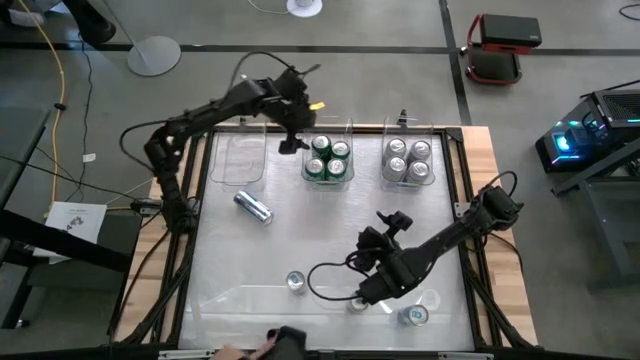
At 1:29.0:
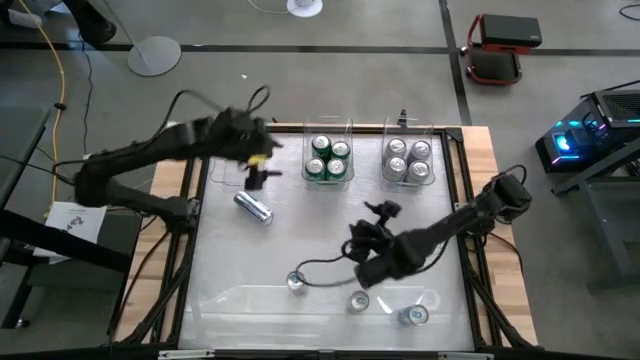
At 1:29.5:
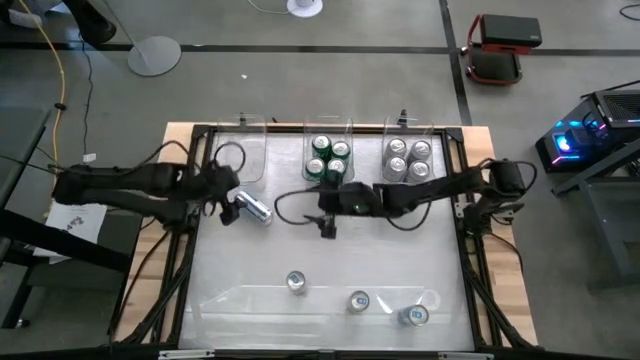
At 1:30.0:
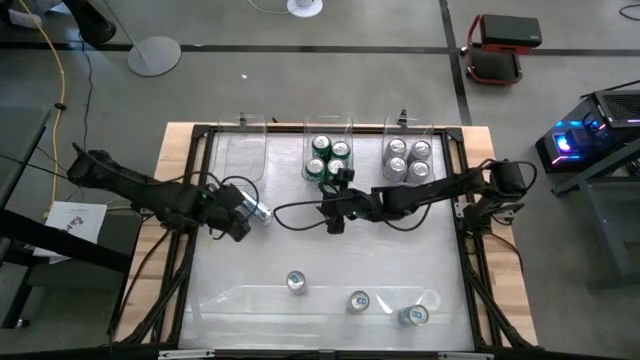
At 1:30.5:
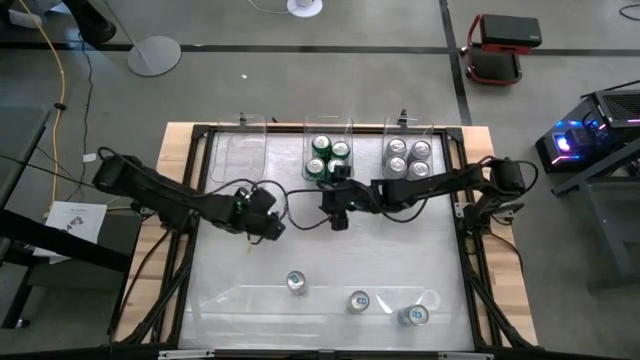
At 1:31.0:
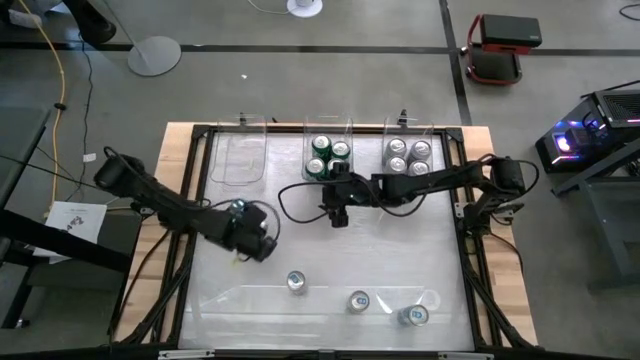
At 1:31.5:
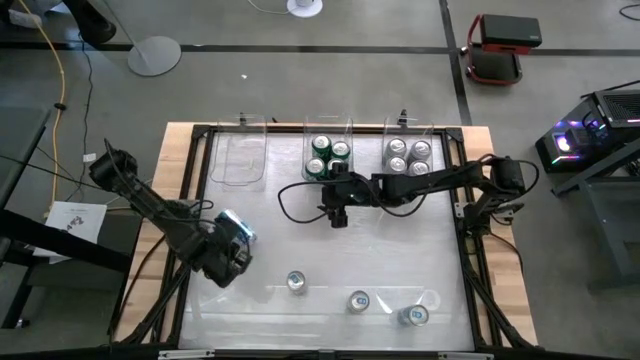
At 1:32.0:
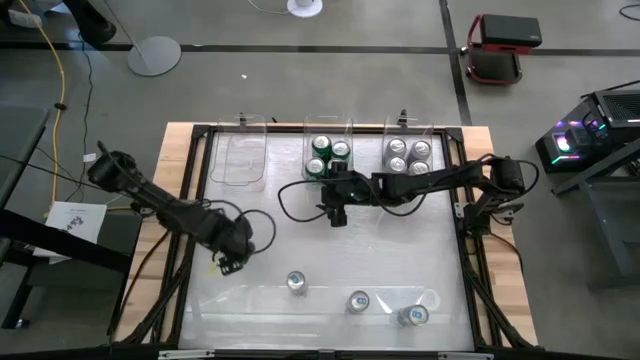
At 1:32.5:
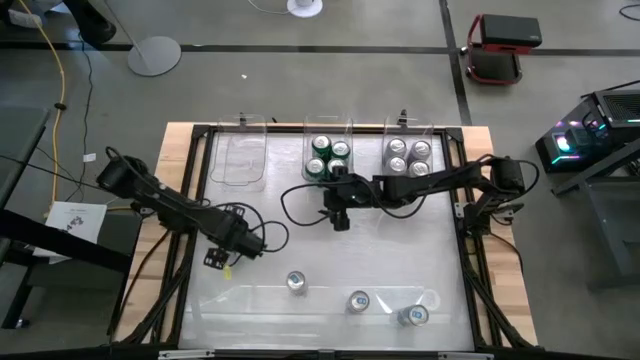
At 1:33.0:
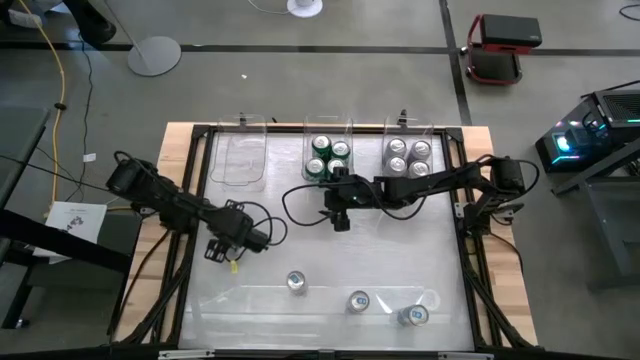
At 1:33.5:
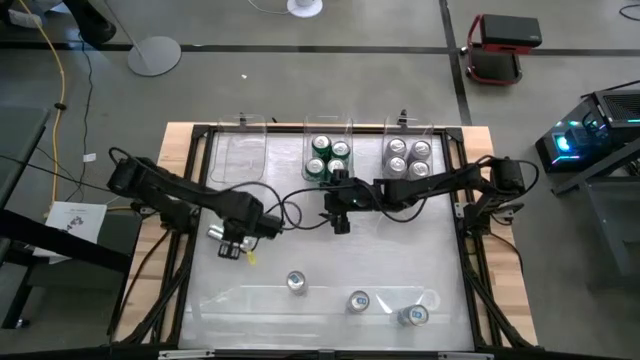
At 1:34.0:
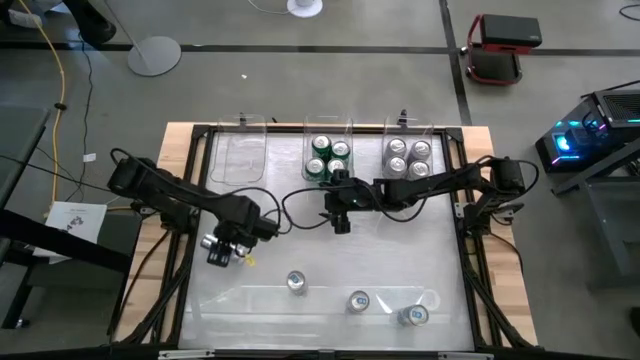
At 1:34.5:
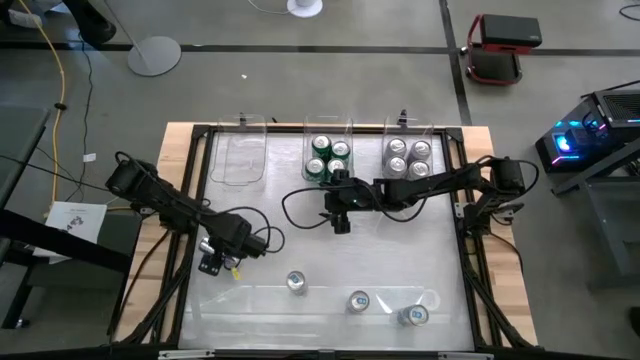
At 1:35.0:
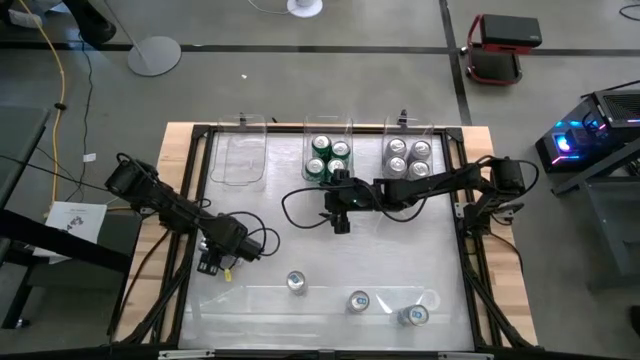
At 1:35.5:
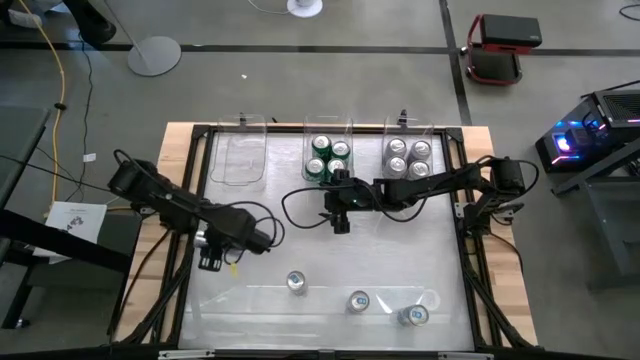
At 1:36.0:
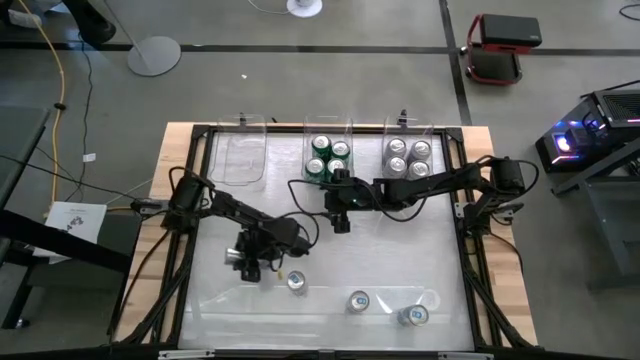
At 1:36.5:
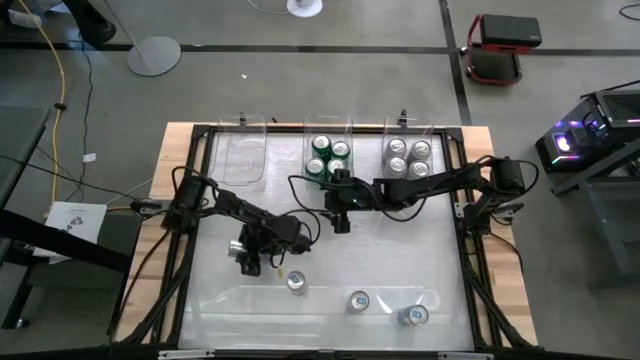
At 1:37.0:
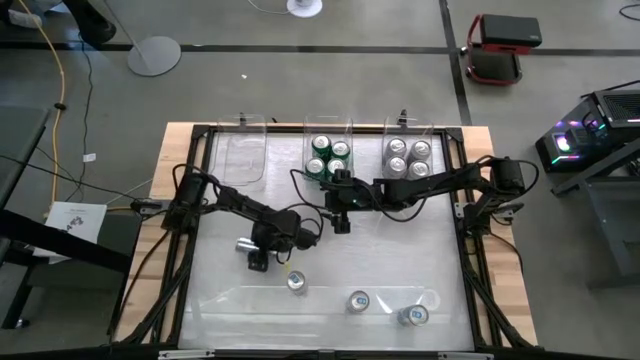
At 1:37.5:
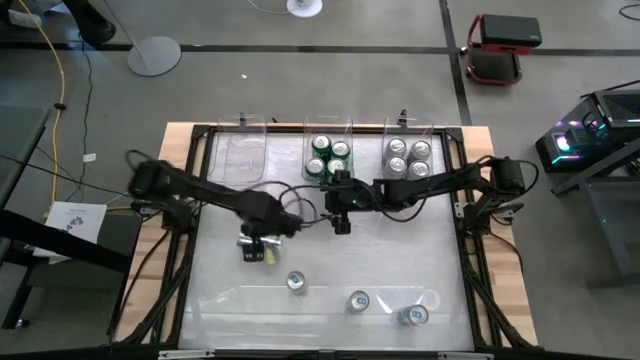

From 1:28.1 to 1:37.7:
Task: Sort soda cans
Put the top left blue can into the left transparent bin

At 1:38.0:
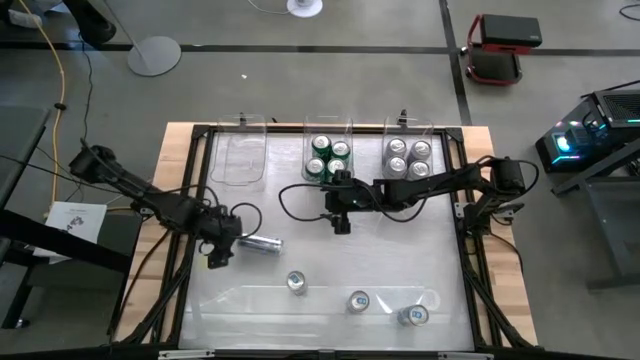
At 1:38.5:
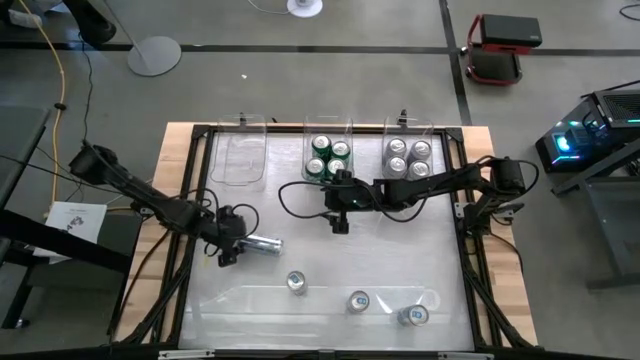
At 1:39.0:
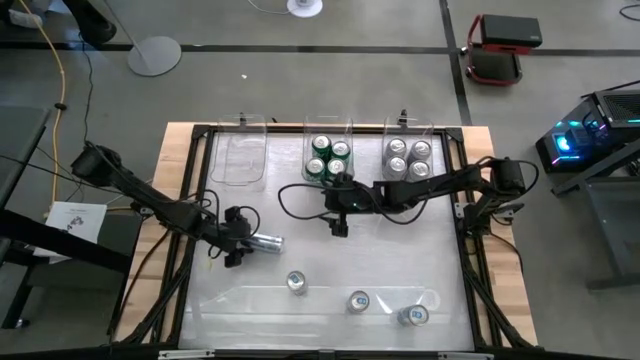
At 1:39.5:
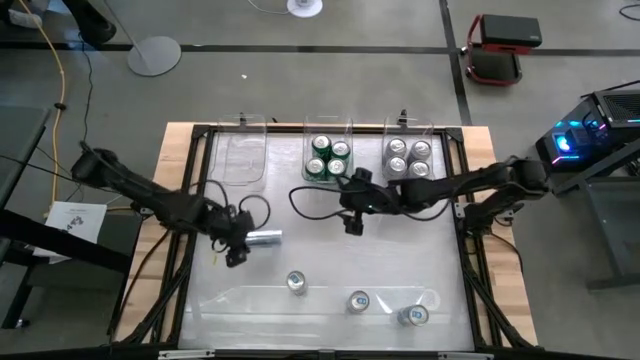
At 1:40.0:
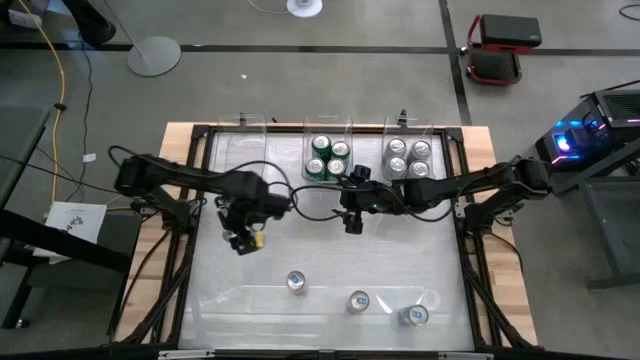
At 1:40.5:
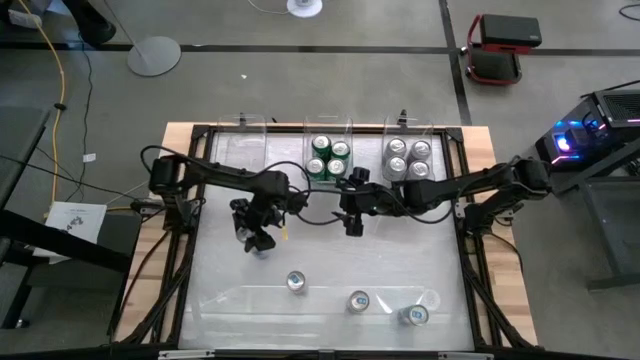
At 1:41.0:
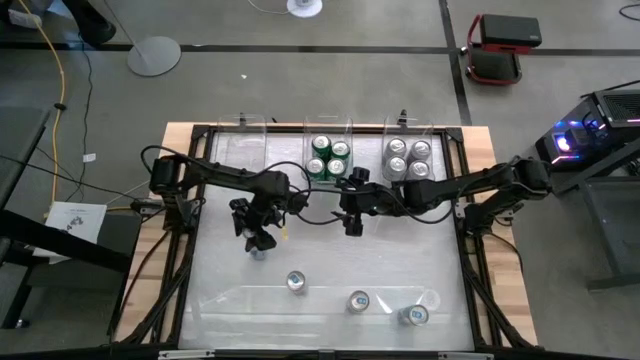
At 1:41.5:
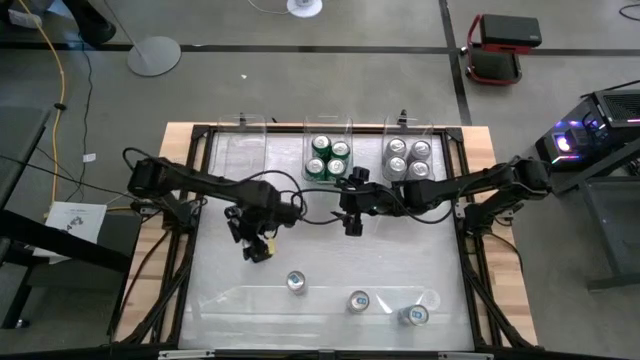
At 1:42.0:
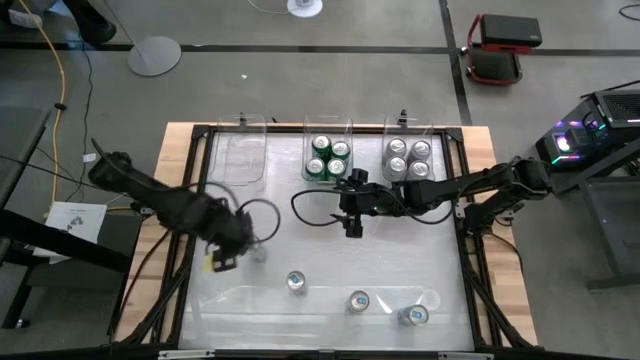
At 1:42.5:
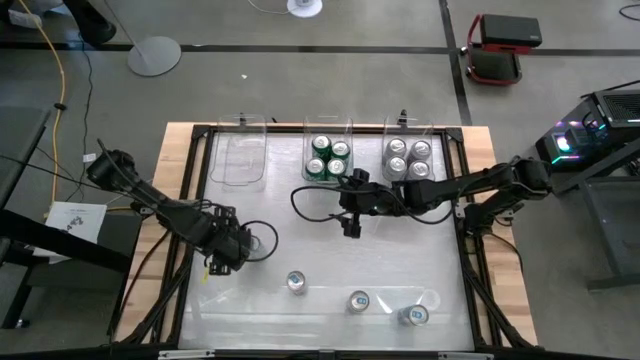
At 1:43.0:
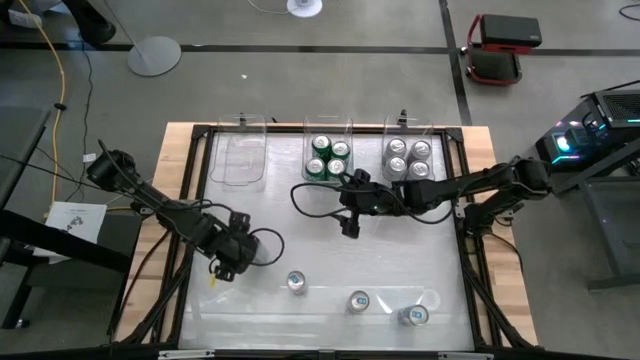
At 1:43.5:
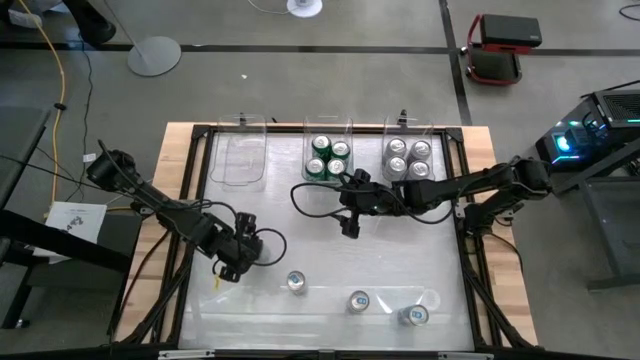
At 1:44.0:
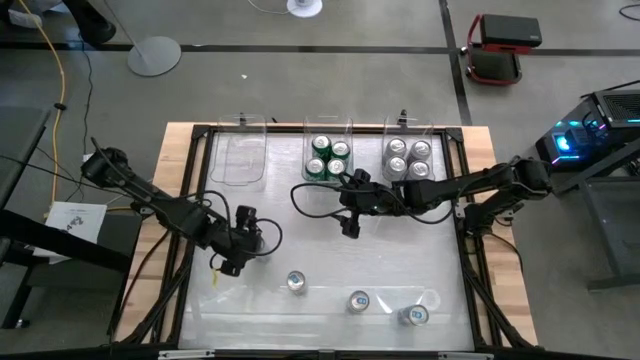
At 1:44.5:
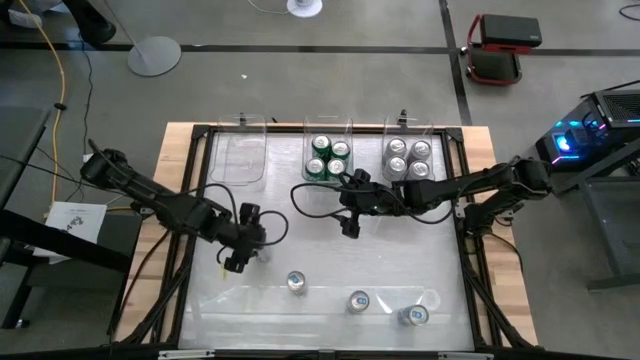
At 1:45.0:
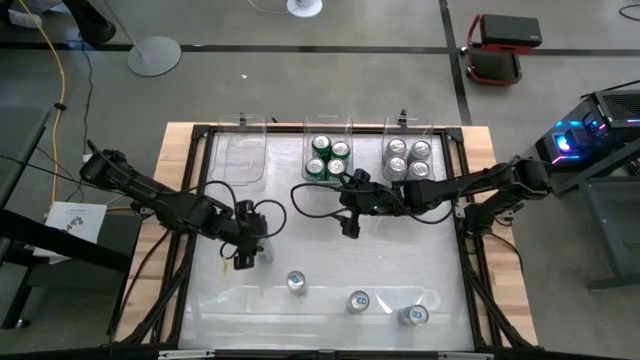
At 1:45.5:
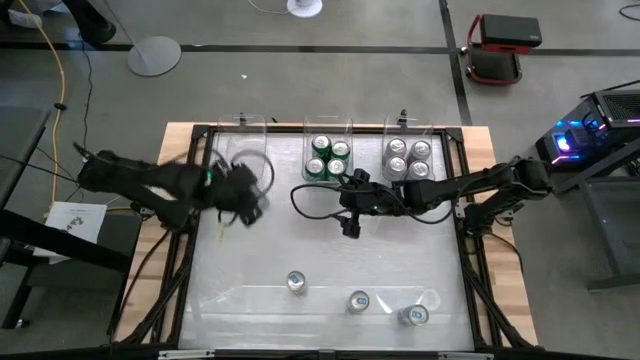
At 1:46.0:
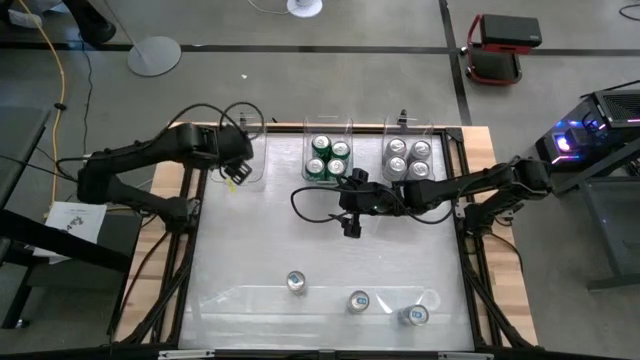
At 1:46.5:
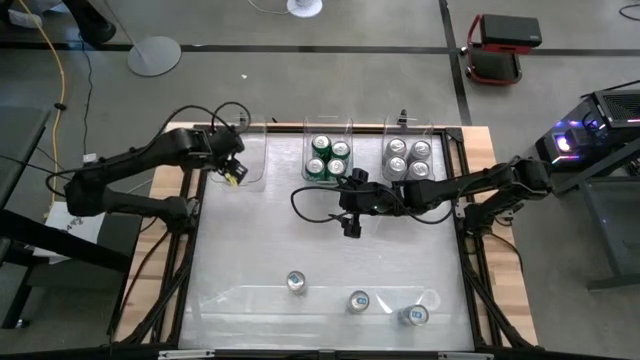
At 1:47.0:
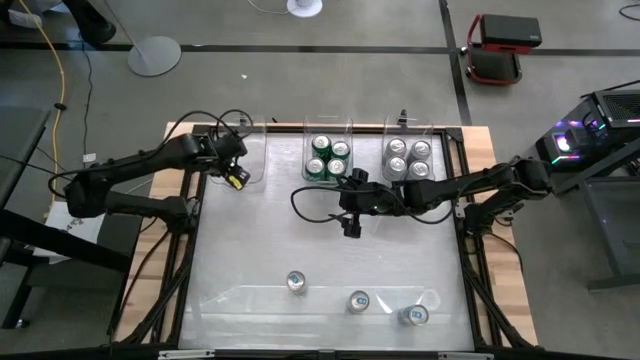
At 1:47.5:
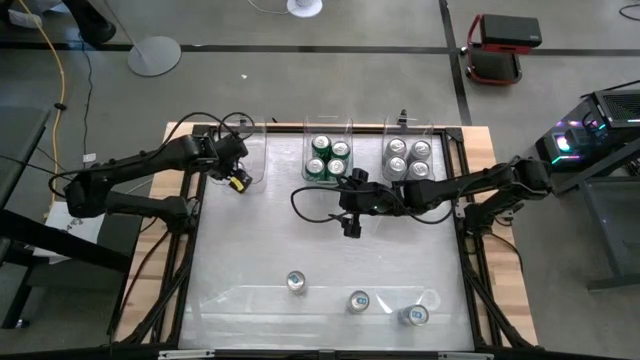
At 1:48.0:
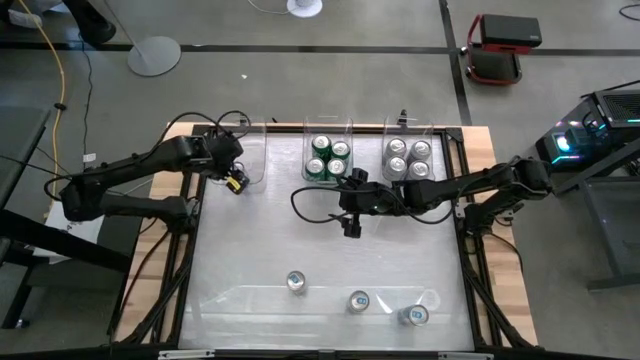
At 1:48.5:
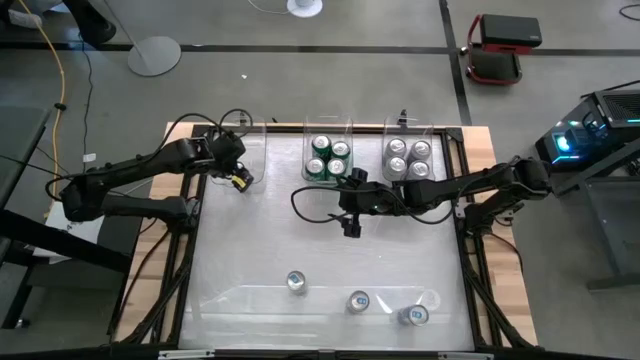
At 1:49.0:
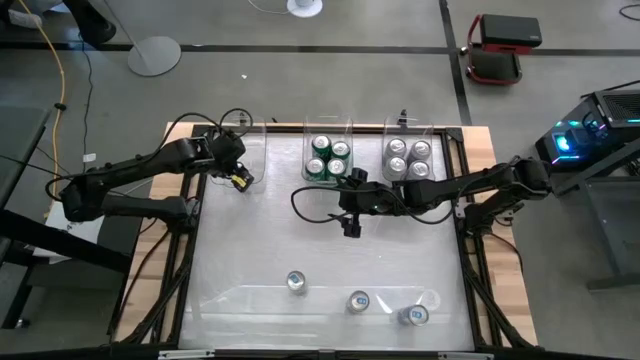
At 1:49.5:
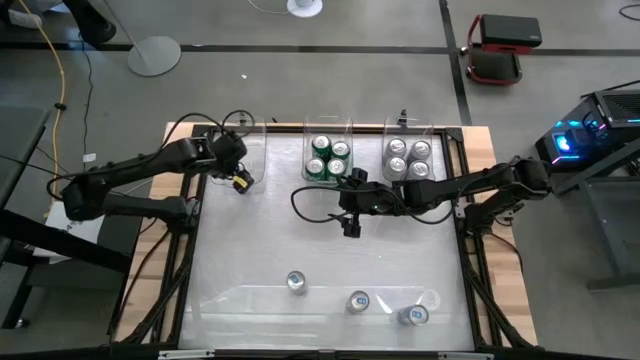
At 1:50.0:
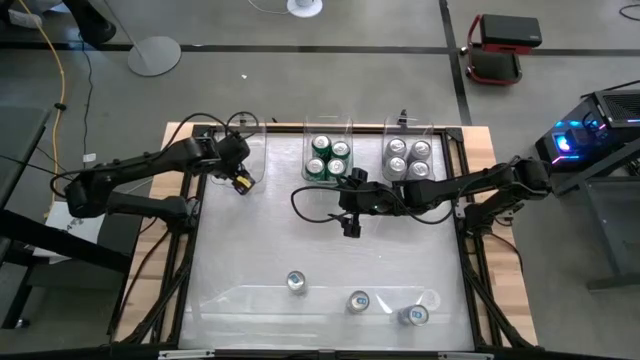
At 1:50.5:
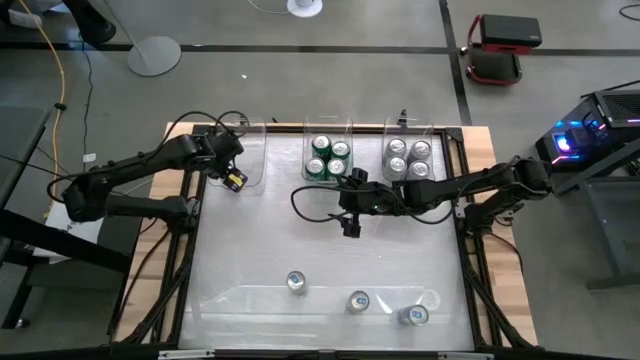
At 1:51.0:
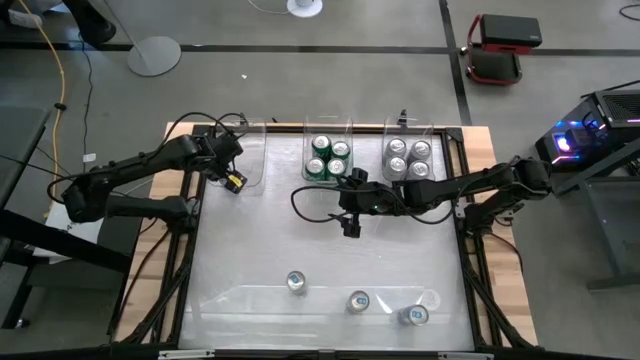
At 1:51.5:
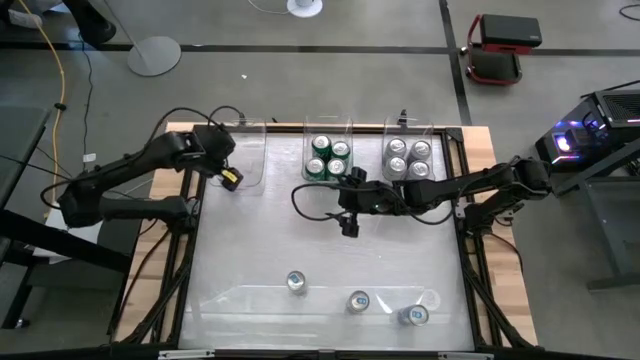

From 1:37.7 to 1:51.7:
Put the top left blue can into the left transparent bin
